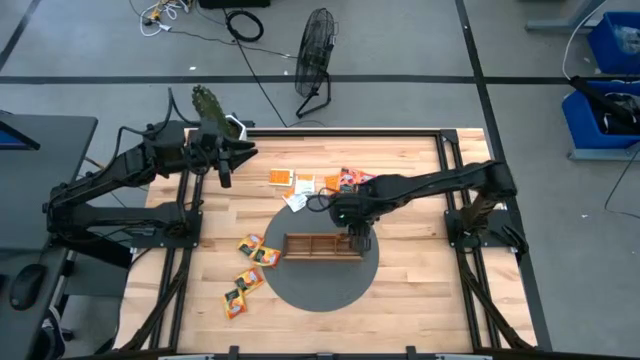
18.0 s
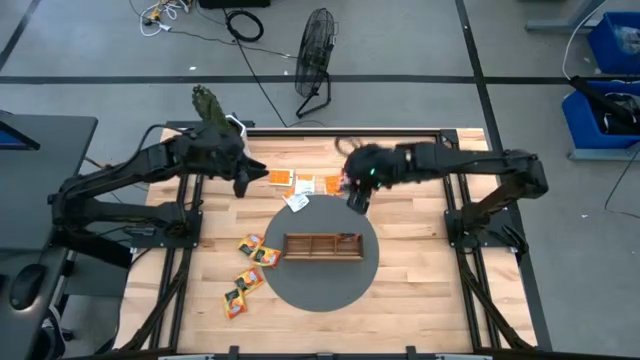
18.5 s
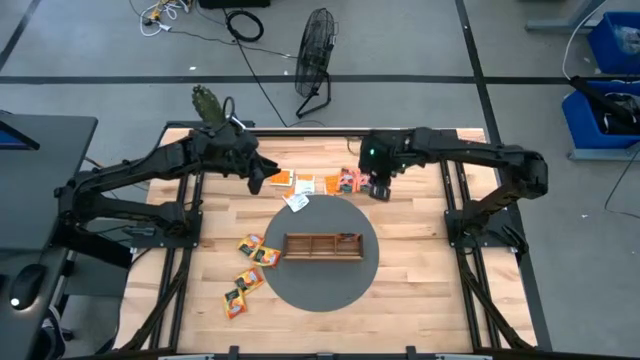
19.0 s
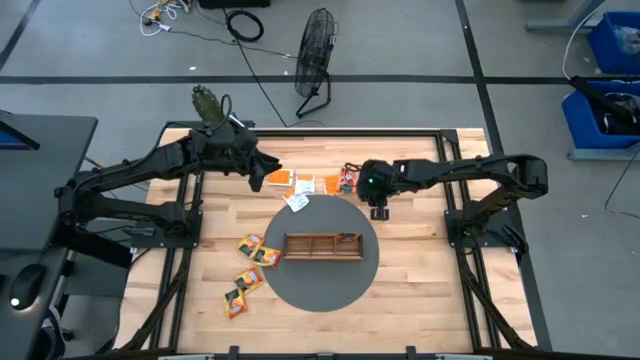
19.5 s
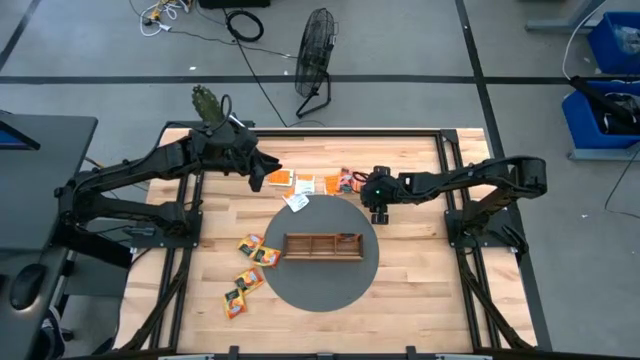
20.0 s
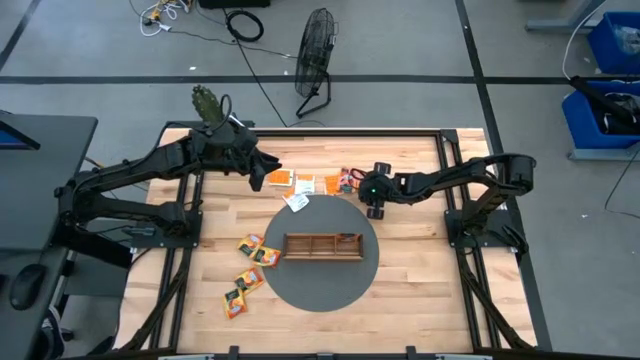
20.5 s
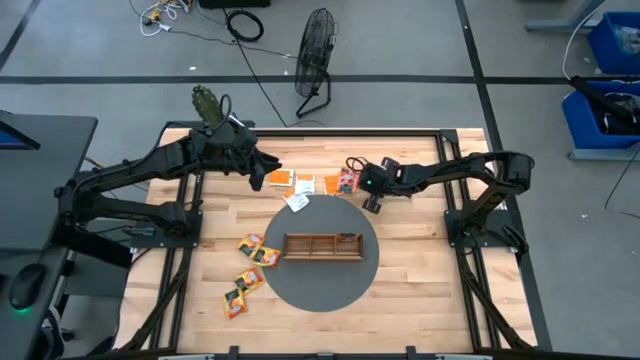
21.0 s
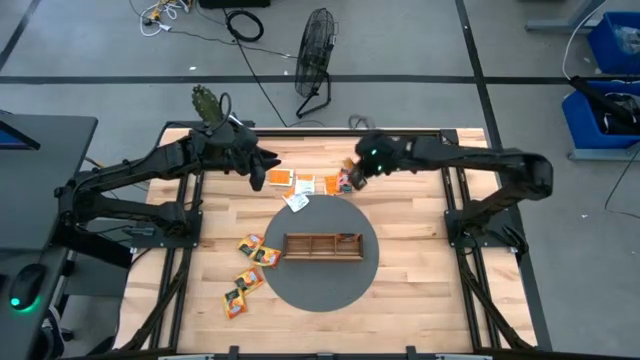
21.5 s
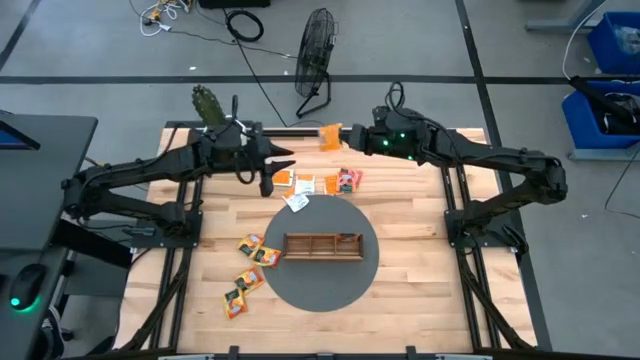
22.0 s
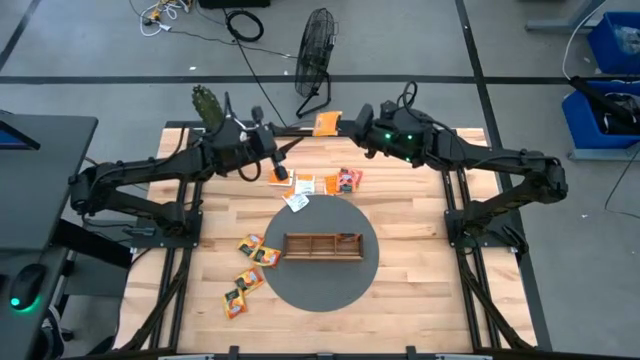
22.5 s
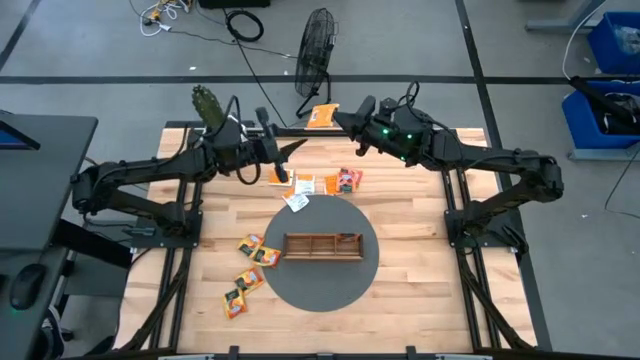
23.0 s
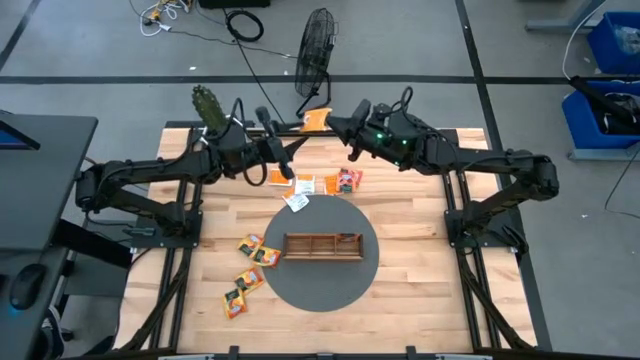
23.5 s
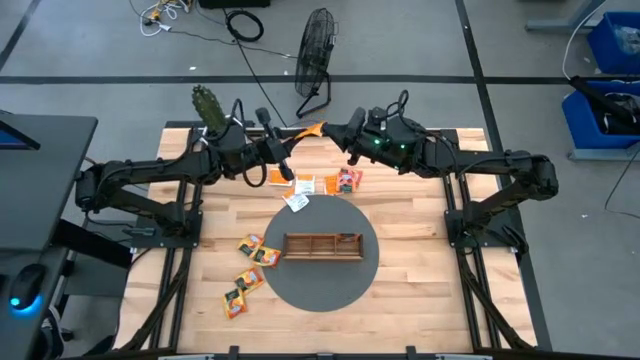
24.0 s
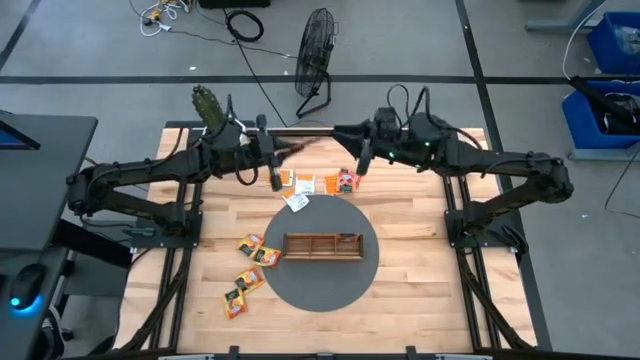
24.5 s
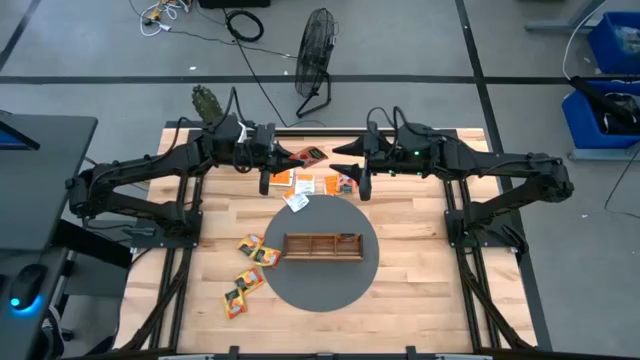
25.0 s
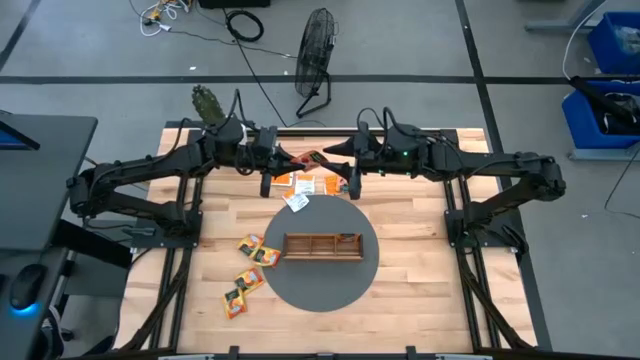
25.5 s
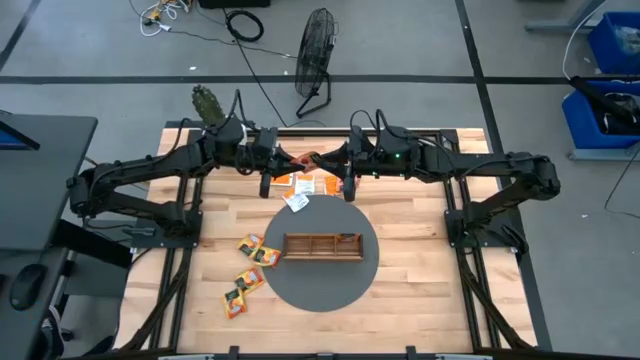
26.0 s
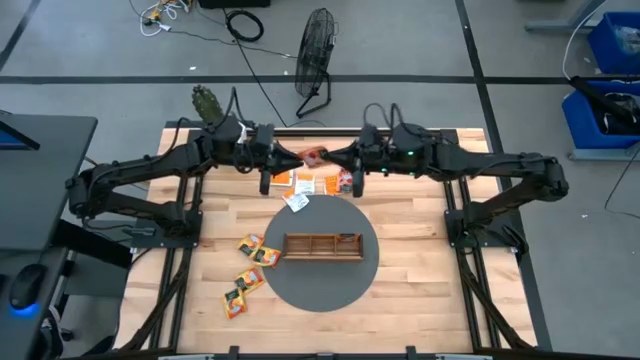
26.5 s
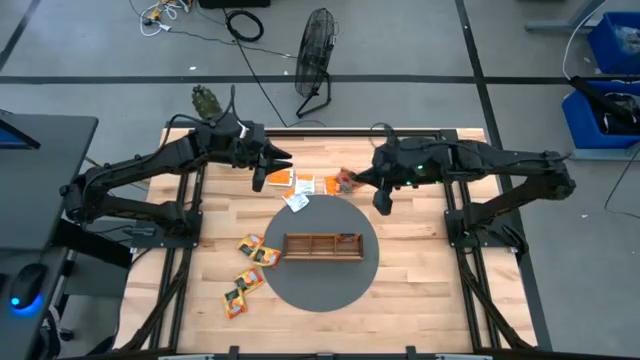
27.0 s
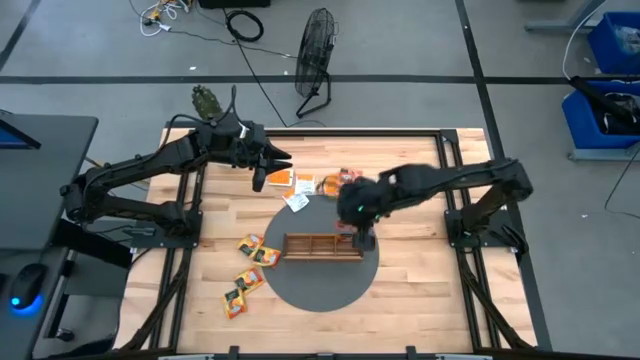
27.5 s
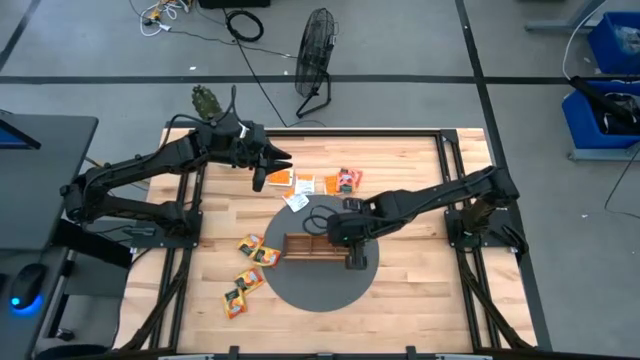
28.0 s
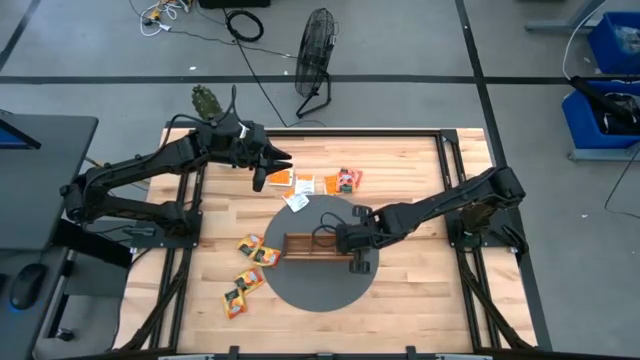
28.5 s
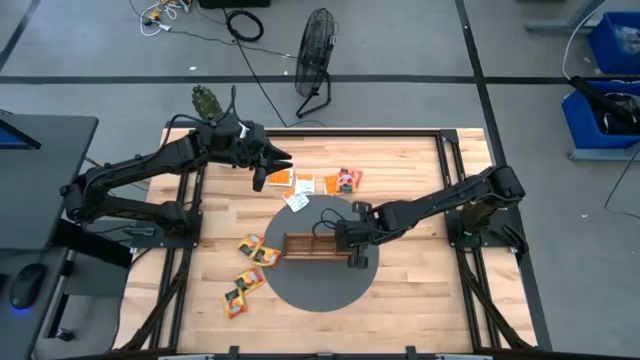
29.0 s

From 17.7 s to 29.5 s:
Task: Pick & Place Tea
Put the red tea bag into the right section of the wooden organizer

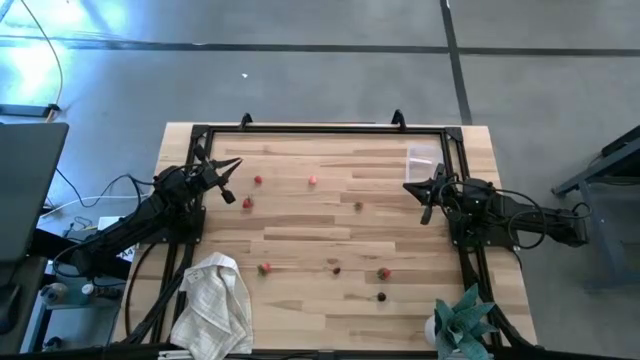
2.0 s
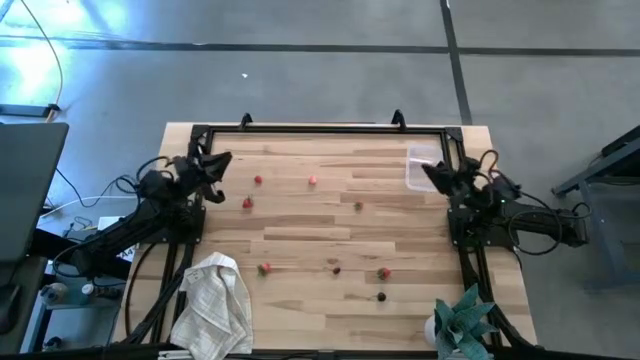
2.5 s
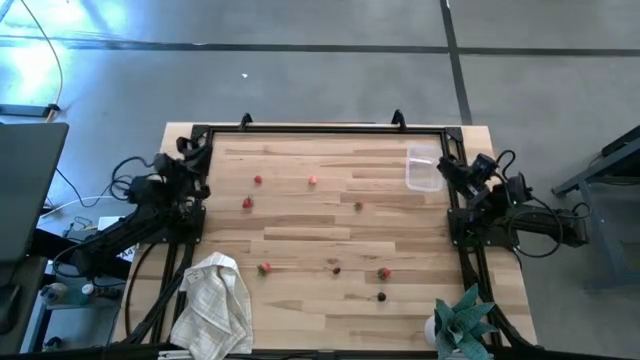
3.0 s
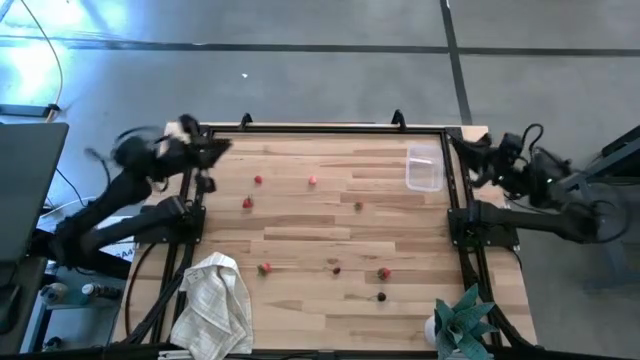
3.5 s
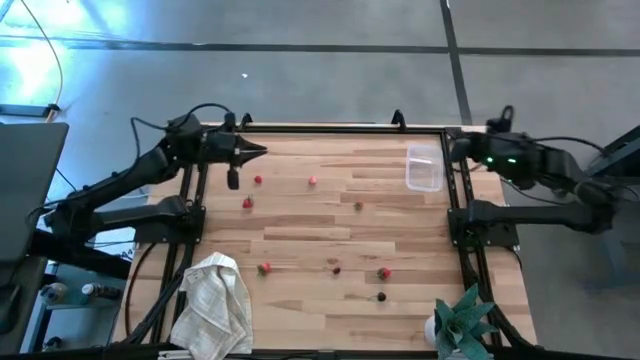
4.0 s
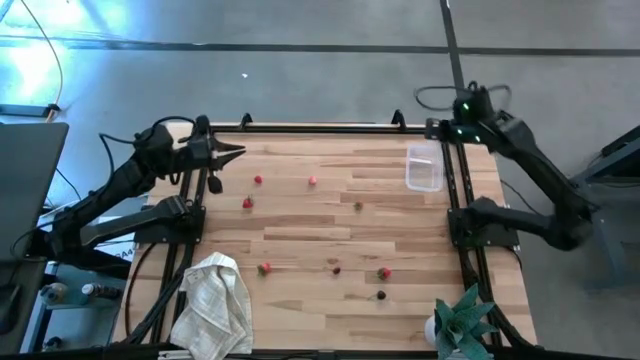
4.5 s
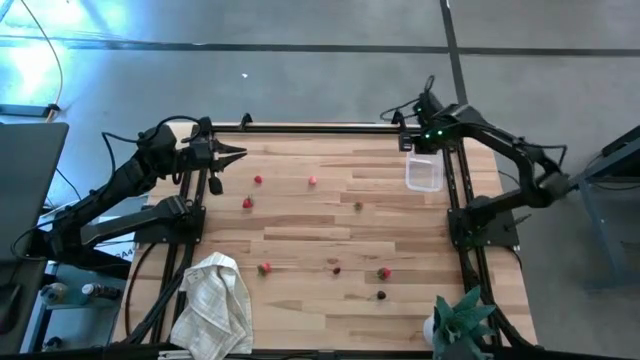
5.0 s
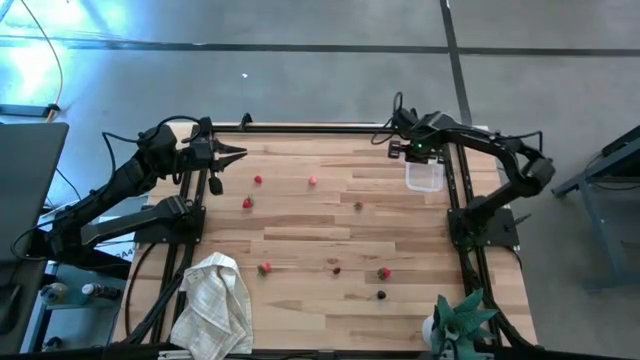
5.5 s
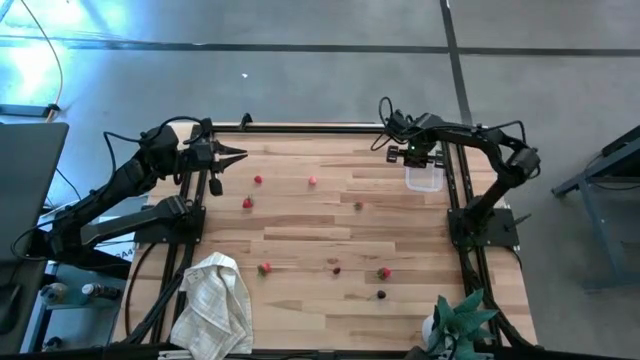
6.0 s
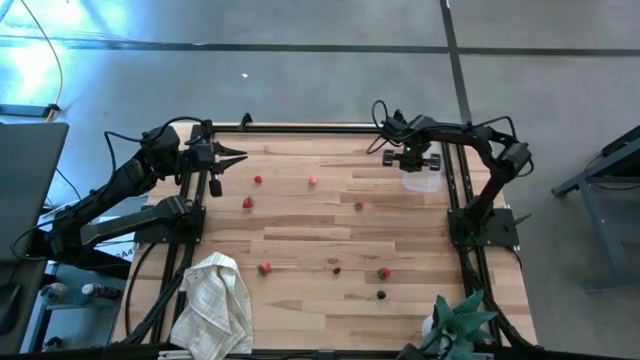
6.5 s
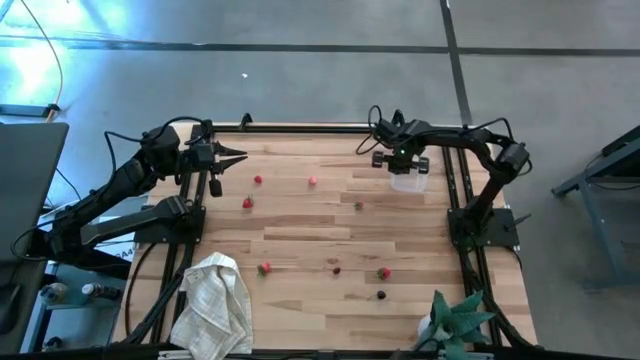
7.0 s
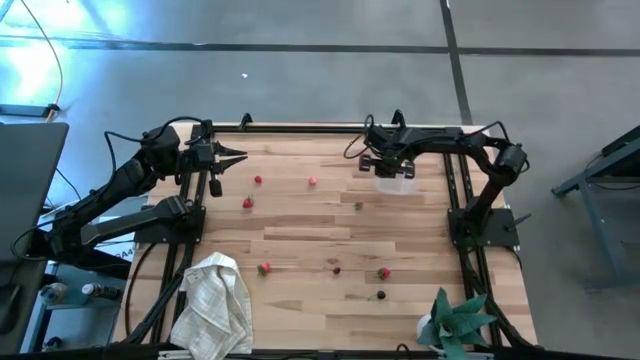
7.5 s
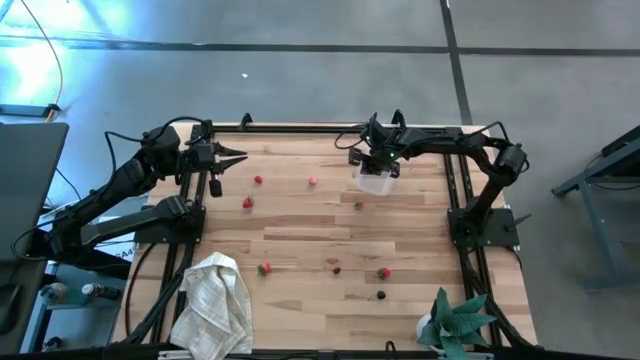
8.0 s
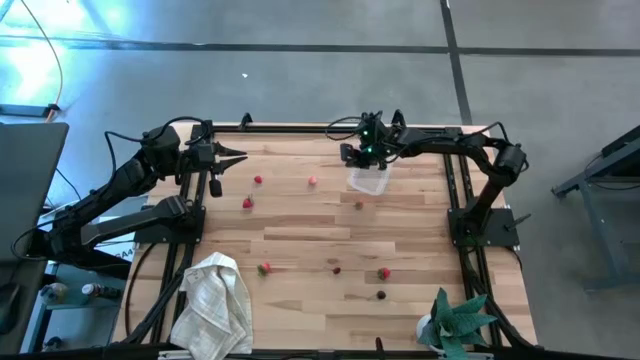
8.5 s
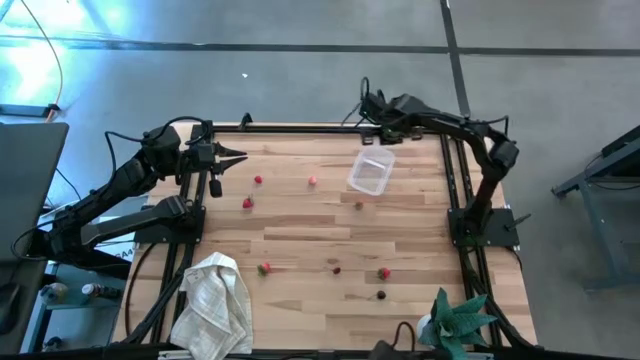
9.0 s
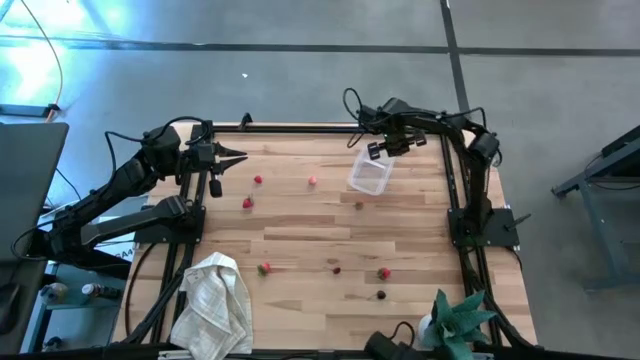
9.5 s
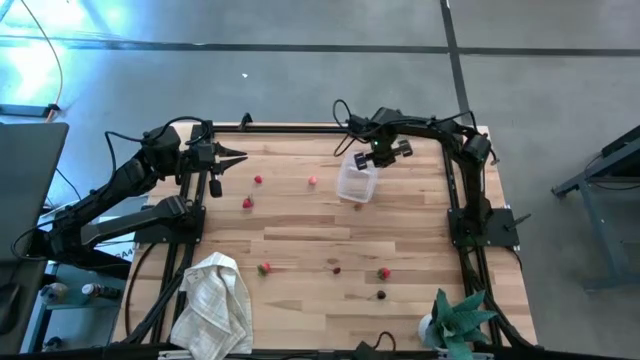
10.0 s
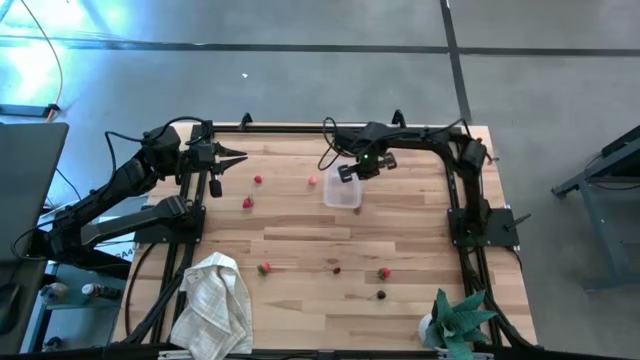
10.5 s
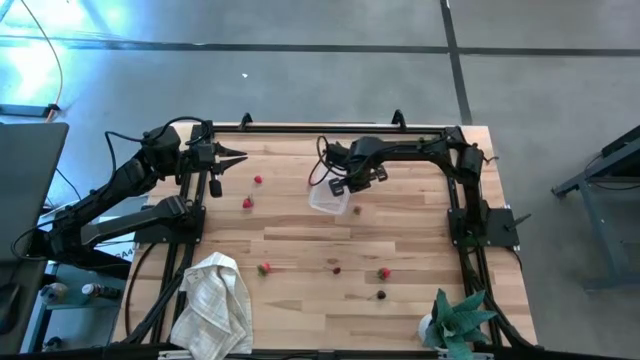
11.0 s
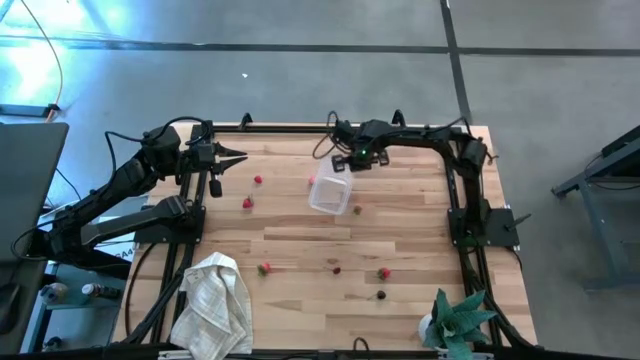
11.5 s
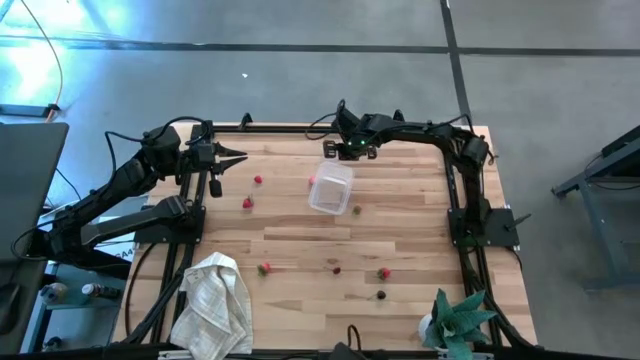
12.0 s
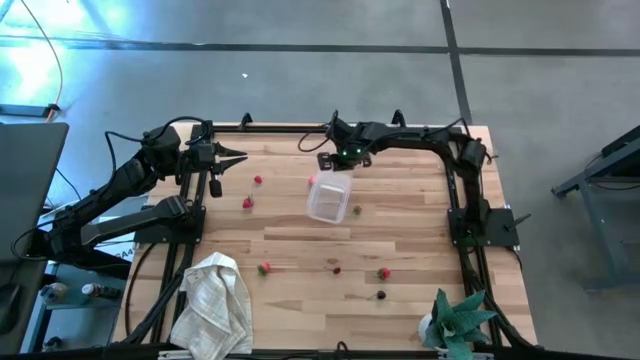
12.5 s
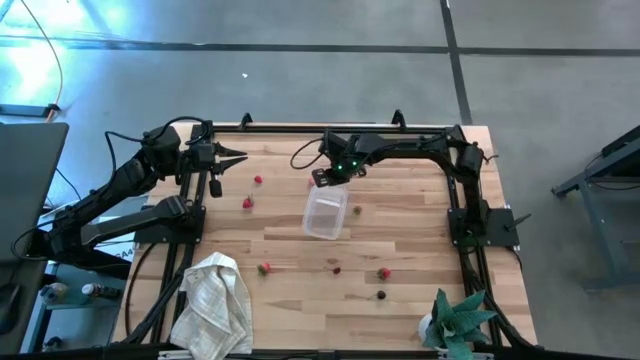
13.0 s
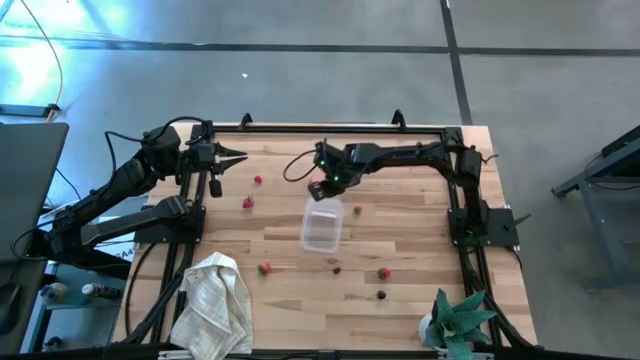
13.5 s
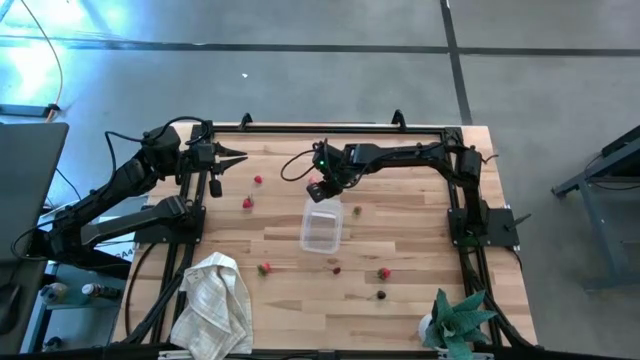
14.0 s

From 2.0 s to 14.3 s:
Task: Pick and placing Produce into tupperware
Move the transparent bin to the center of the table
